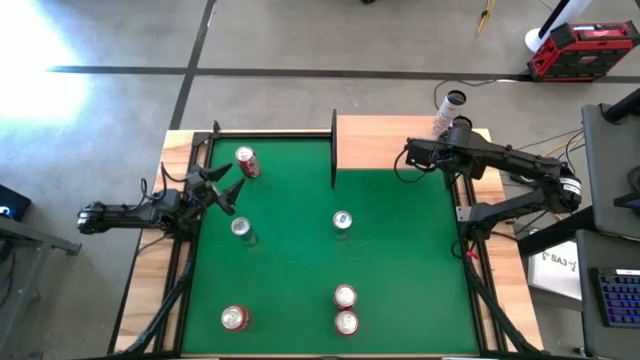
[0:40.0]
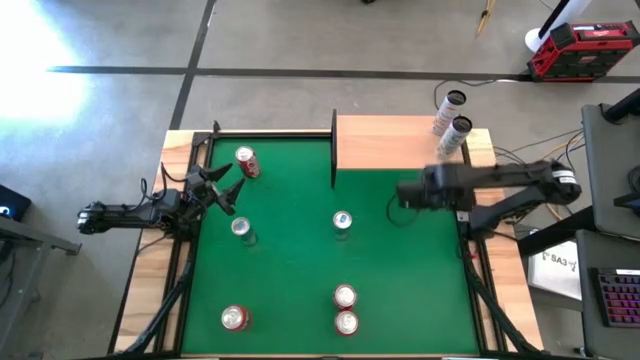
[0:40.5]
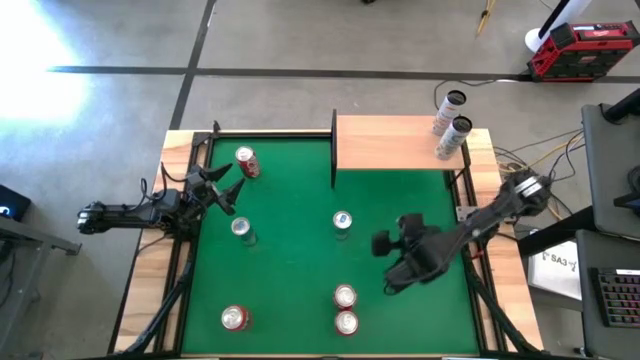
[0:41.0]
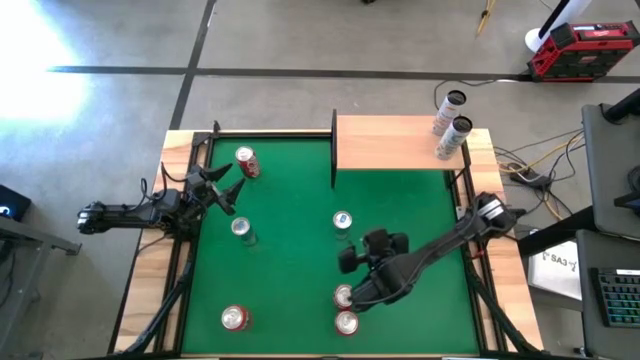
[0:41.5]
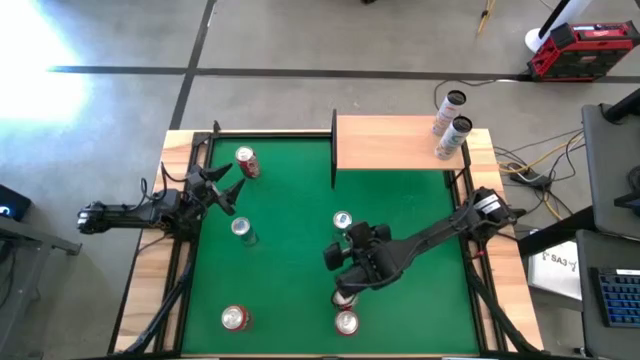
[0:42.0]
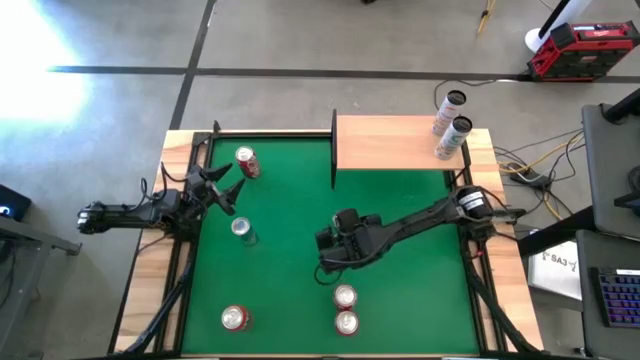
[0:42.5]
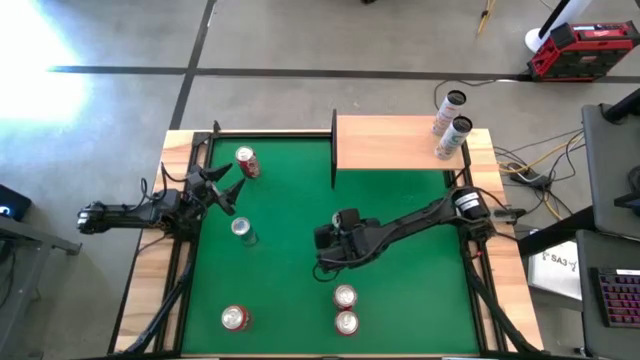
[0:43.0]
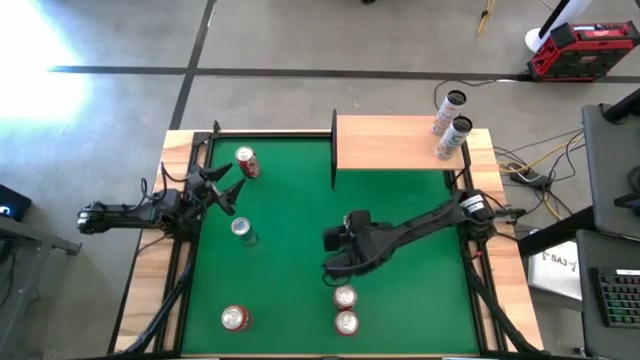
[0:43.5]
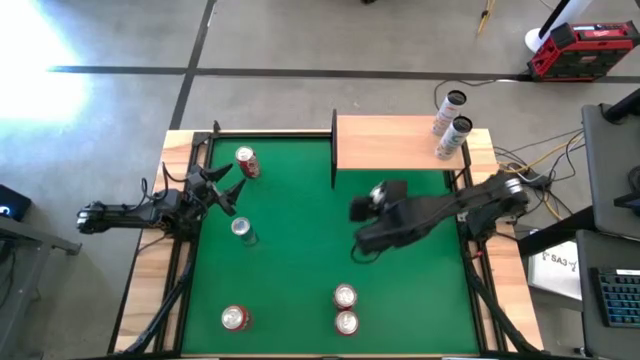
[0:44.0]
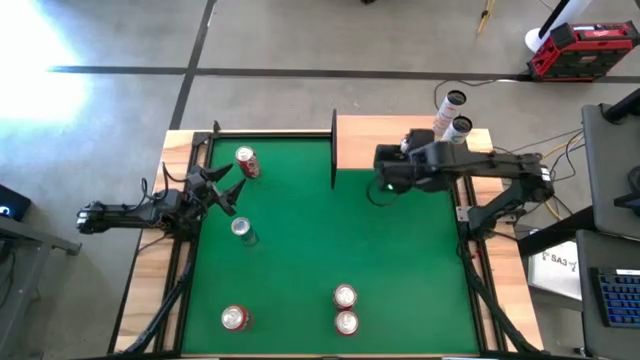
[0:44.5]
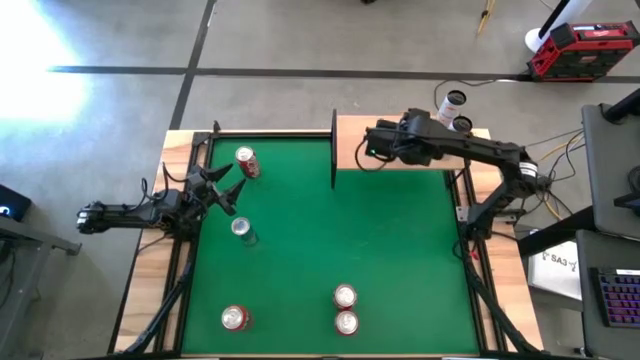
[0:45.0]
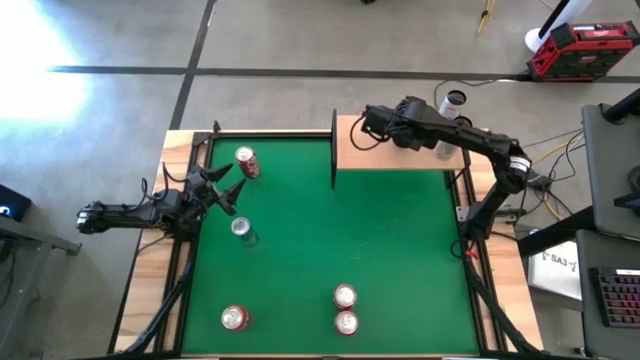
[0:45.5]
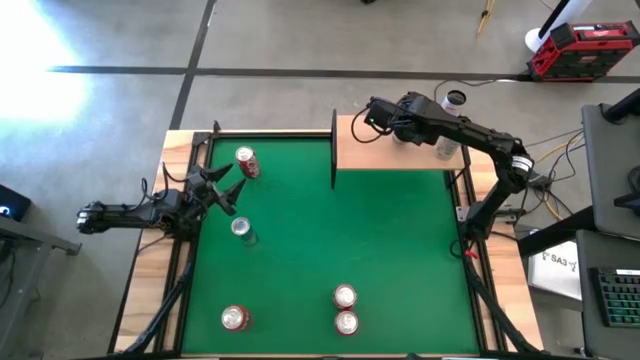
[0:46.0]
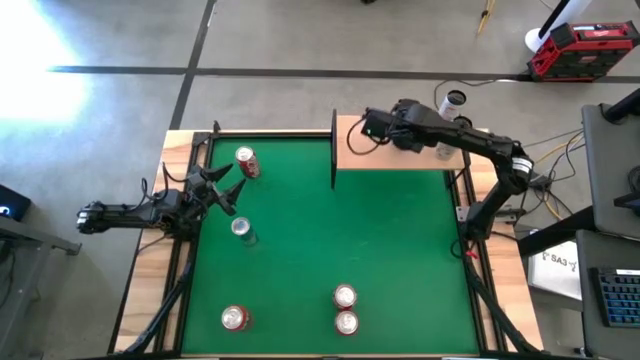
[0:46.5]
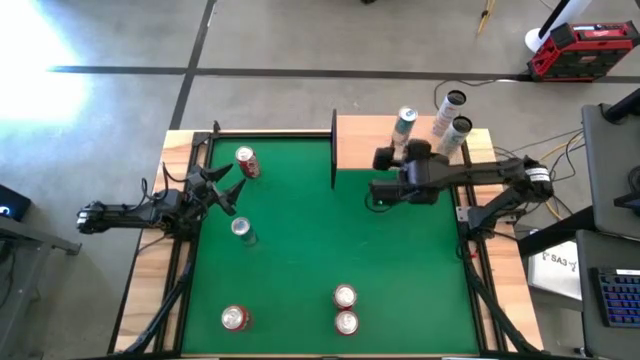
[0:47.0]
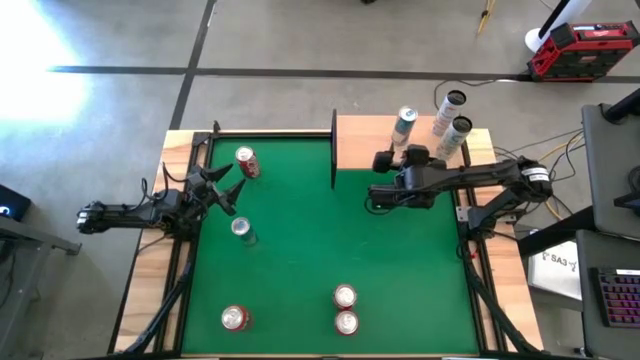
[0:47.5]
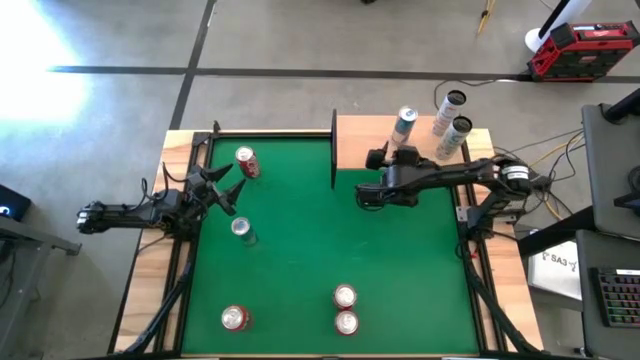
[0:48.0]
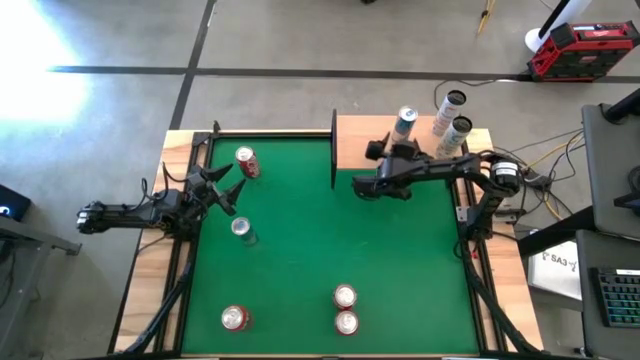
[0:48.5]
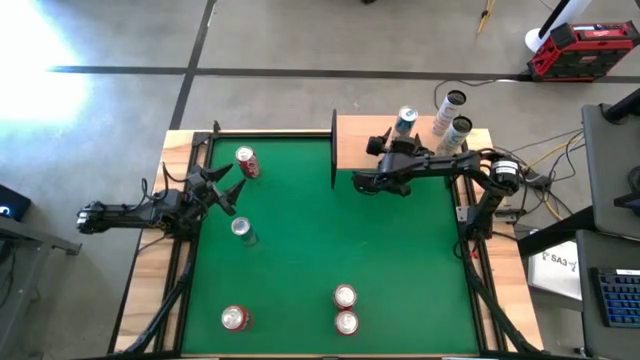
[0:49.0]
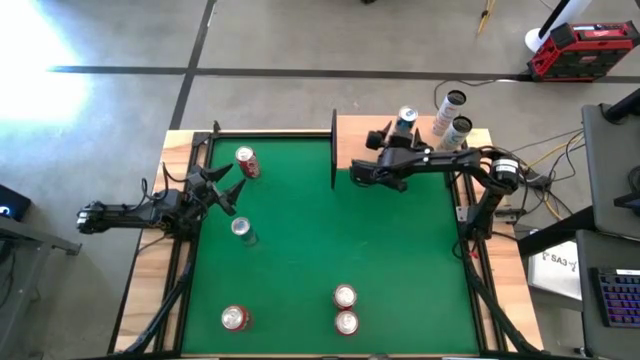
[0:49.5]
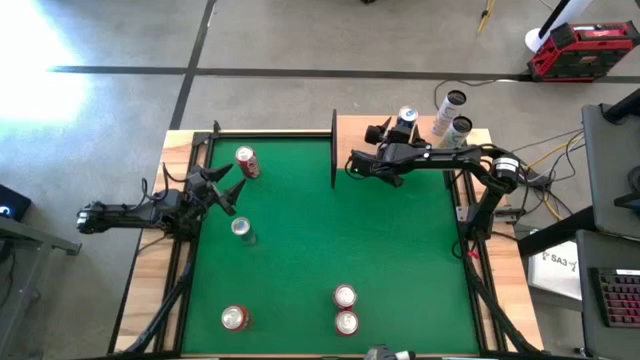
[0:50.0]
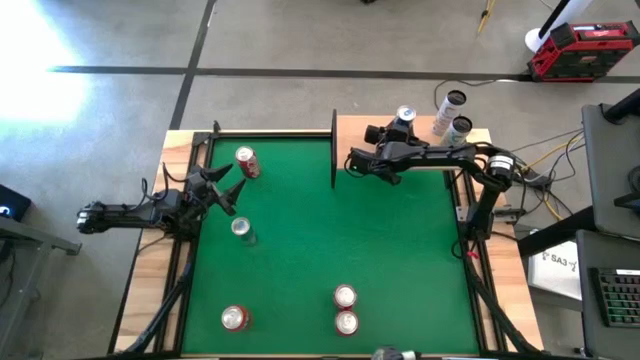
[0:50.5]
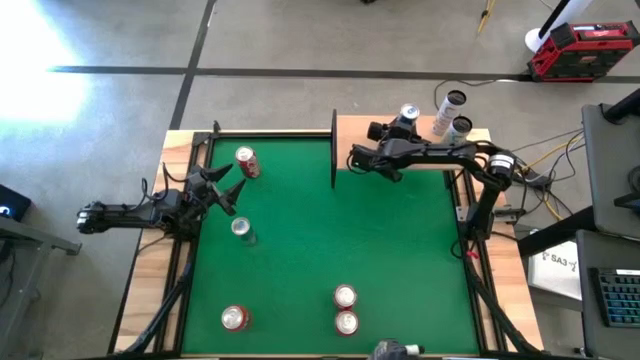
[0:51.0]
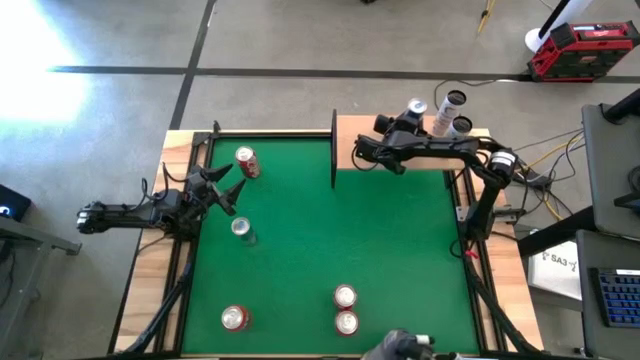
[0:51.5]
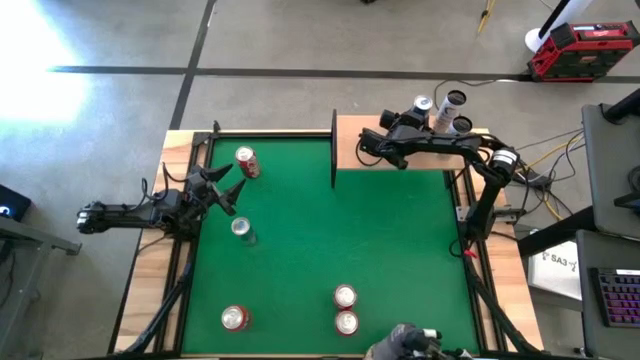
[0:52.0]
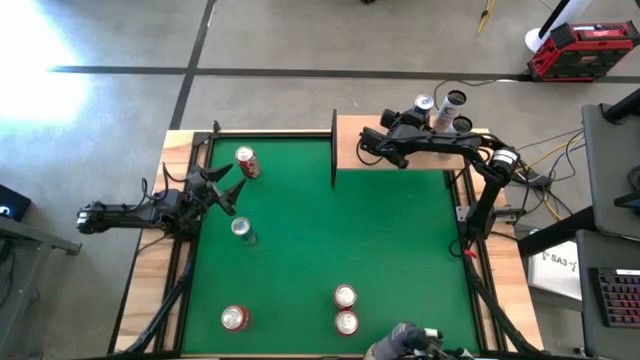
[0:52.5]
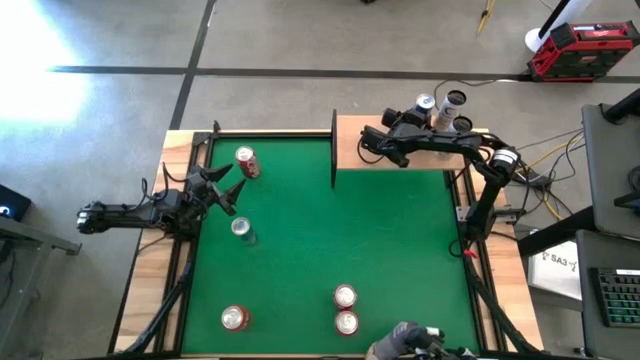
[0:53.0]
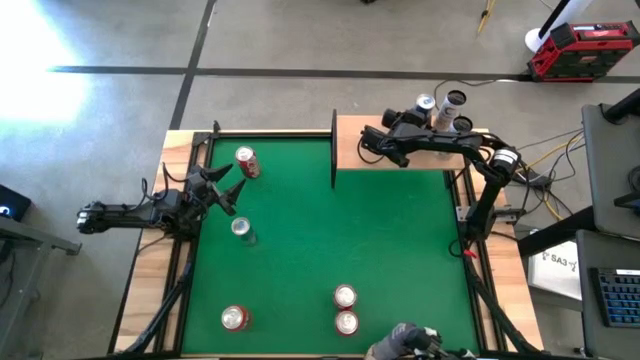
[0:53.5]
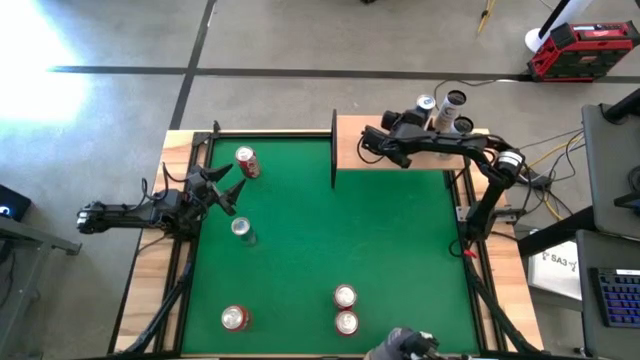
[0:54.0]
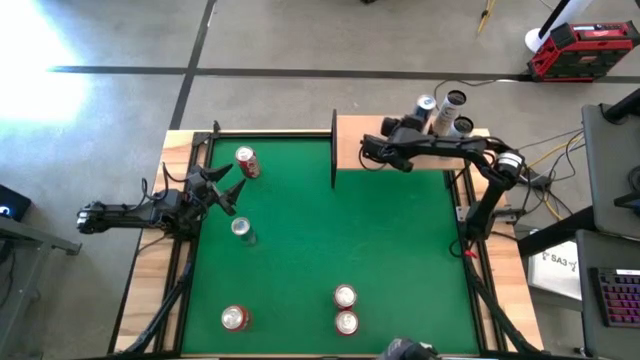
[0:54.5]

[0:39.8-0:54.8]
Task: Place canned beverage on shelf
Put the right blue soda can on the shelf

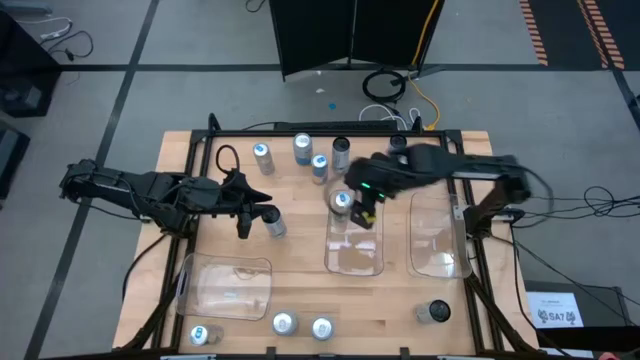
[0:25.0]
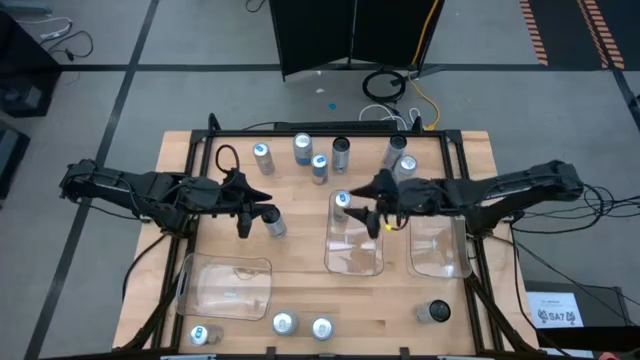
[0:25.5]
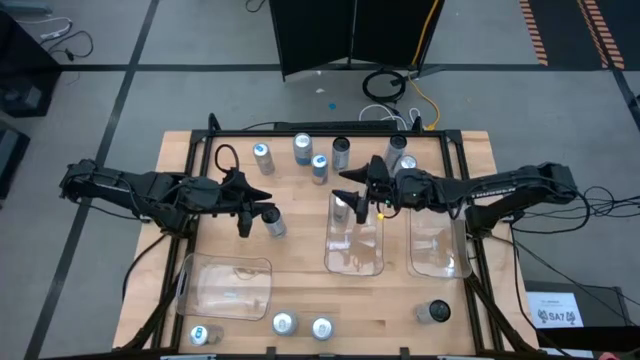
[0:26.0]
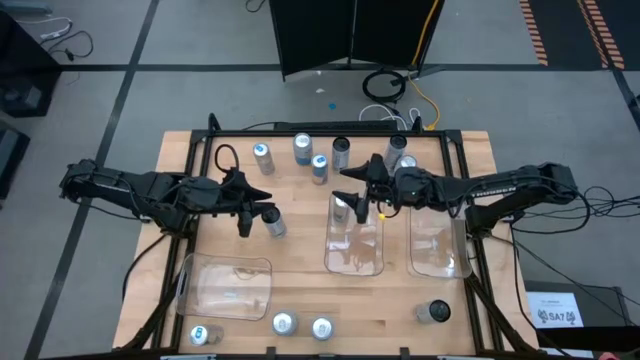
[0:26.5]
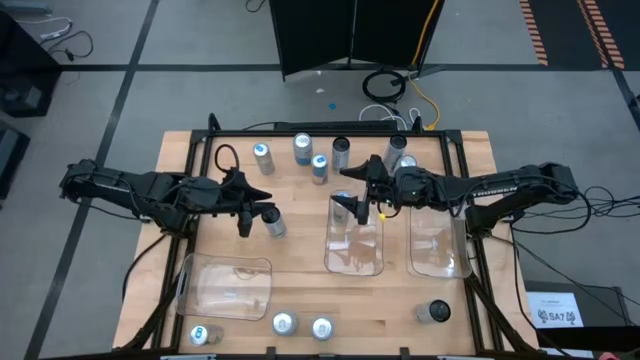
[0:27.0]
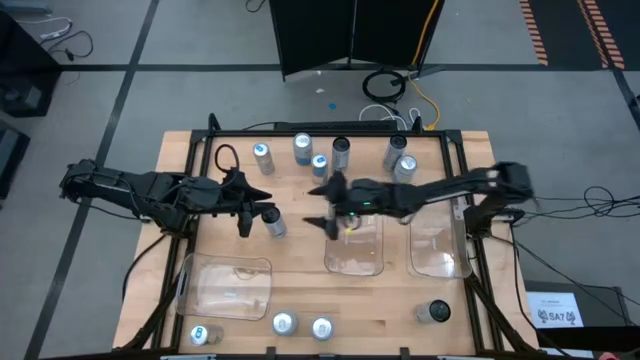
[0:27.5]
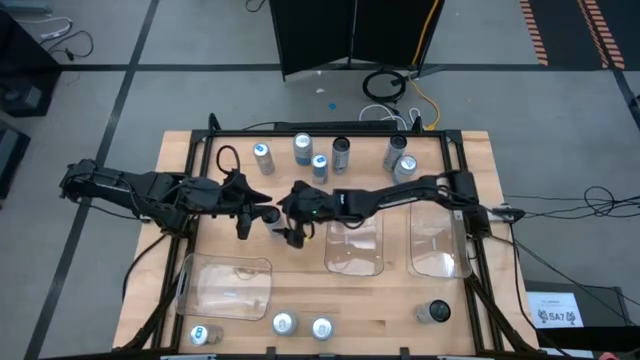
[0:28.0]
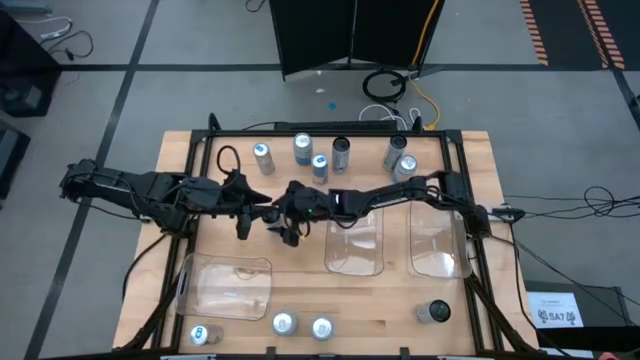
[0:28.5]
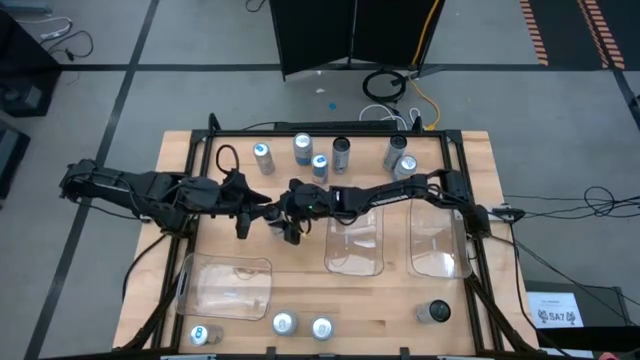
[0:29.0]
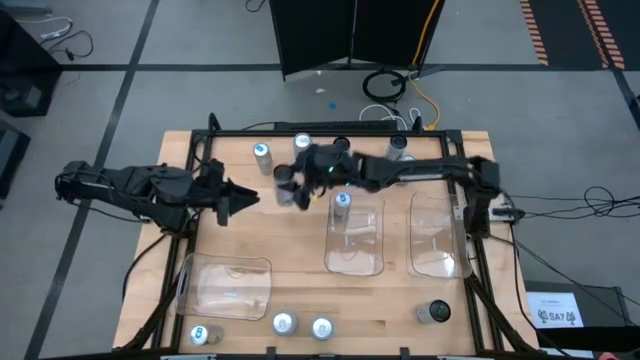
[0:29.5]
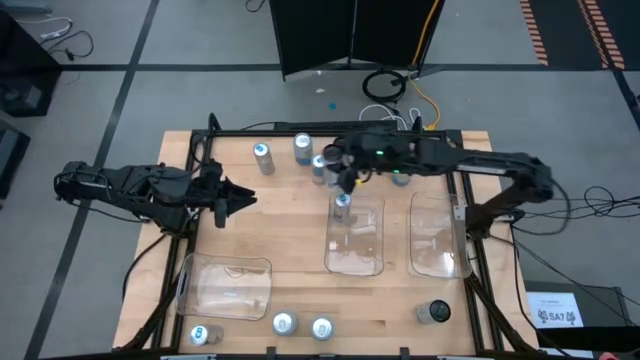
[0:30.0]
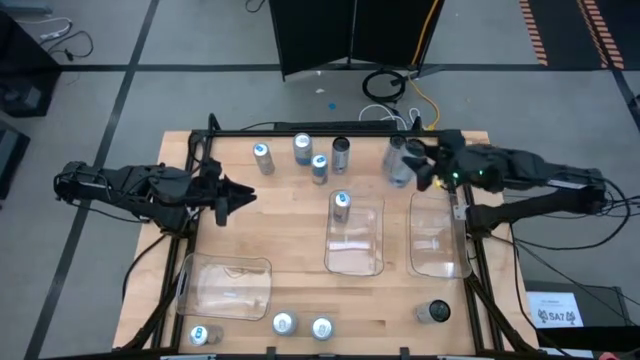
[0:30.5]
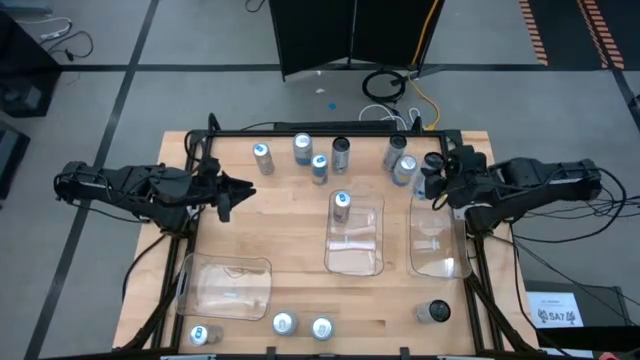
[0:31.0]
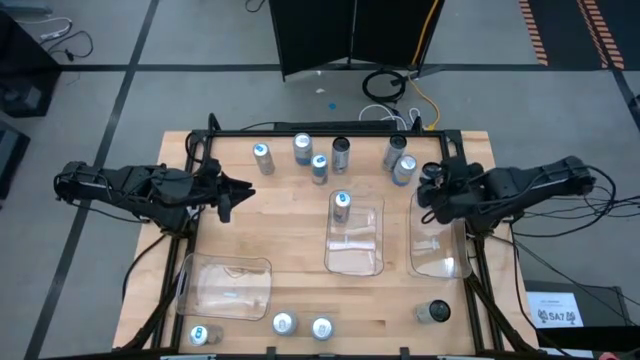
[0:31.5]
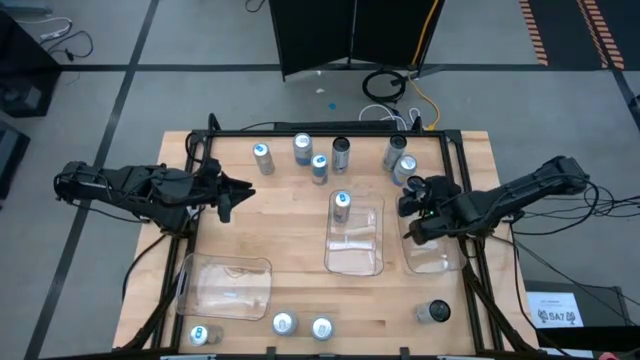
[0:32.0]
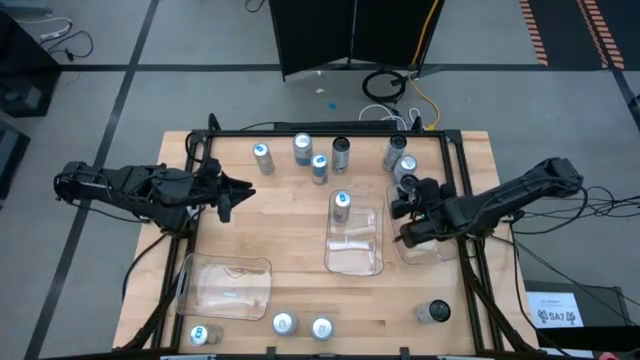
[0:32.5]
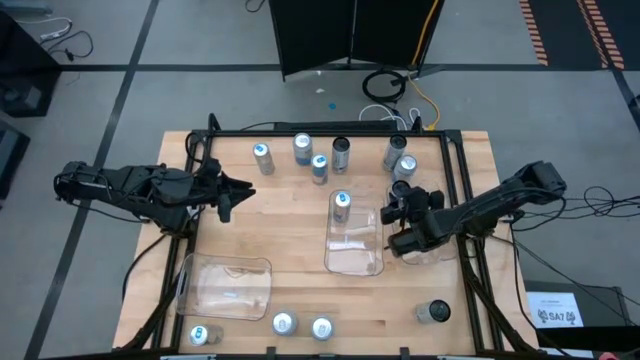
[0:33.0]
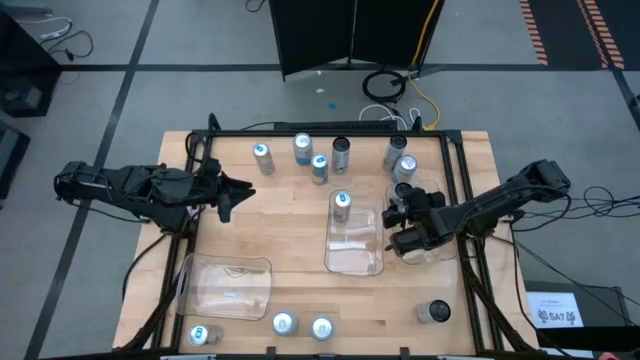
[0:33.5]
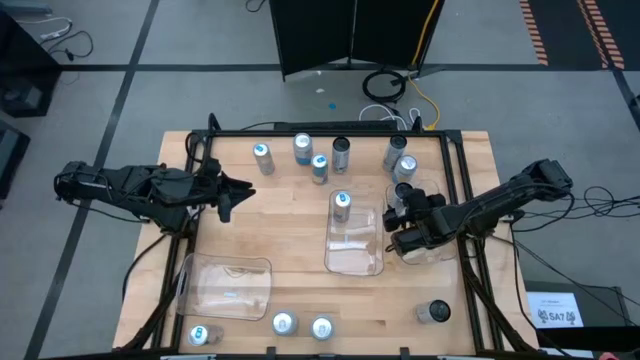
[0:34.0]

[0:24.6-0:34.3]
Task: Sort soda cans
Put the bottom left white-blue soda can into the right transparent bin
